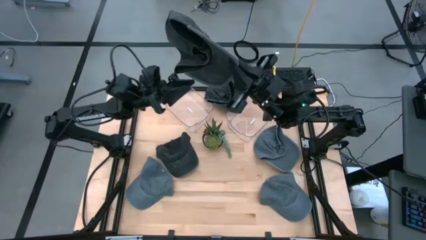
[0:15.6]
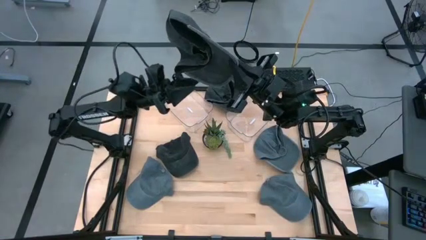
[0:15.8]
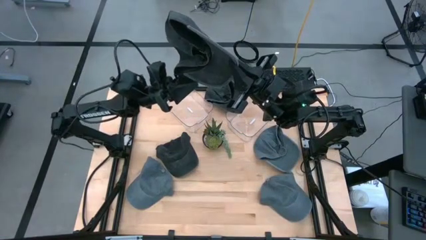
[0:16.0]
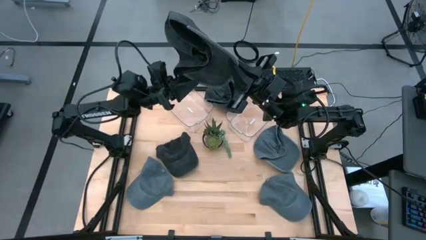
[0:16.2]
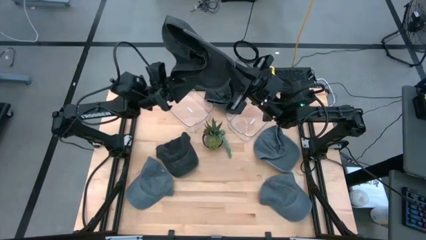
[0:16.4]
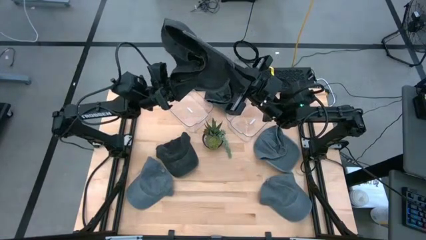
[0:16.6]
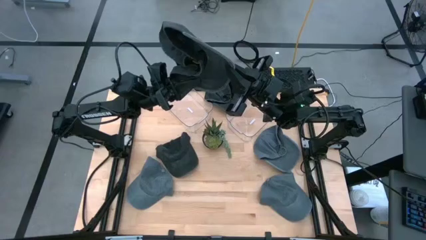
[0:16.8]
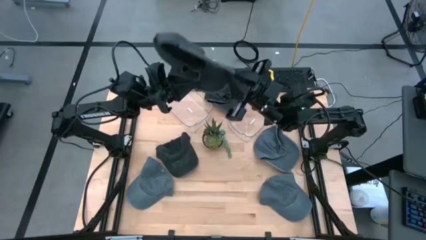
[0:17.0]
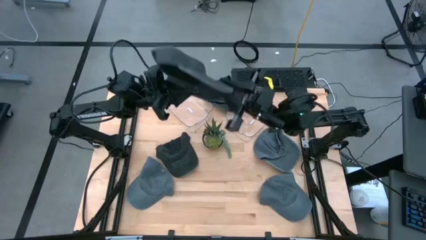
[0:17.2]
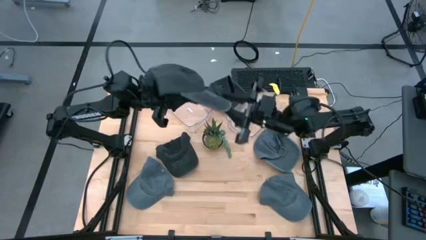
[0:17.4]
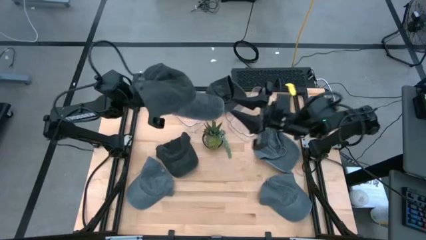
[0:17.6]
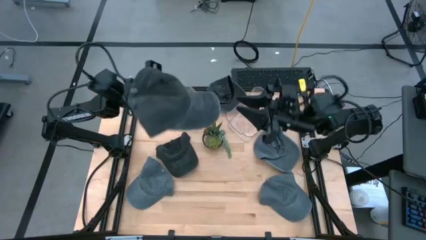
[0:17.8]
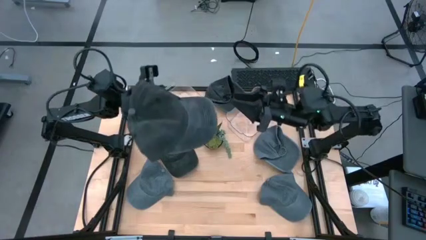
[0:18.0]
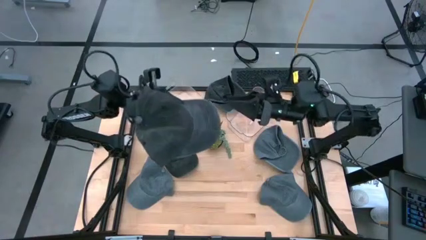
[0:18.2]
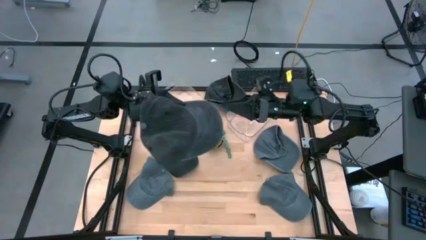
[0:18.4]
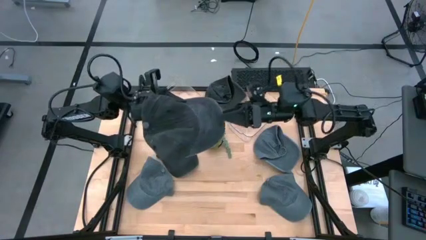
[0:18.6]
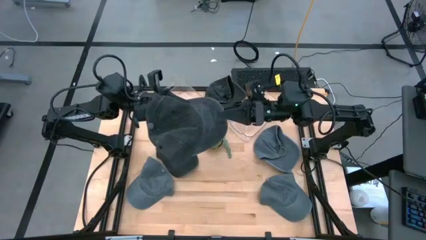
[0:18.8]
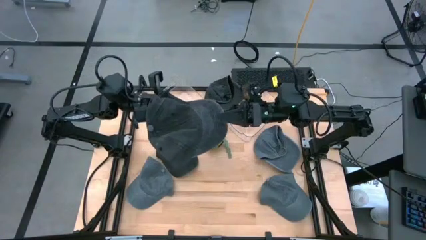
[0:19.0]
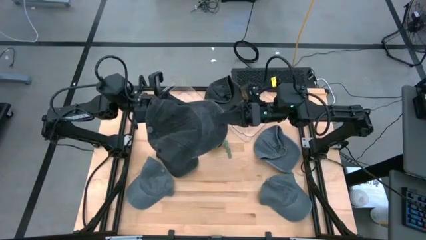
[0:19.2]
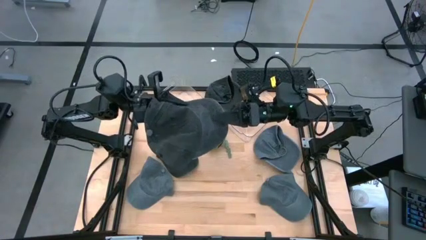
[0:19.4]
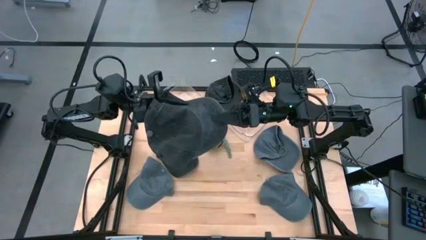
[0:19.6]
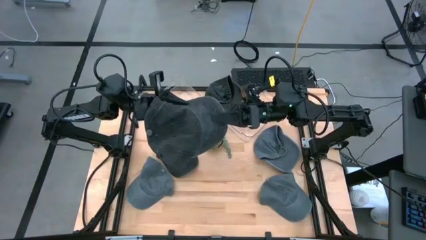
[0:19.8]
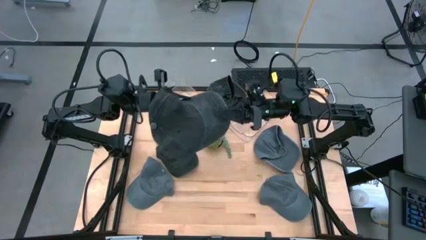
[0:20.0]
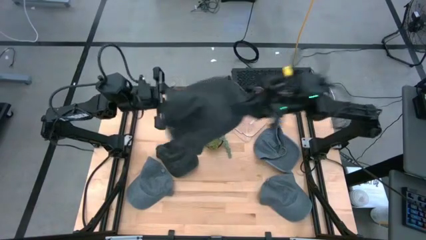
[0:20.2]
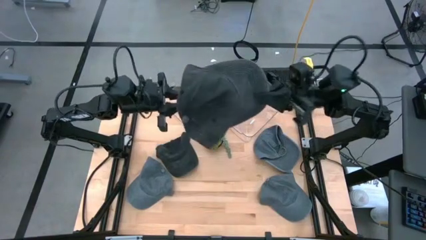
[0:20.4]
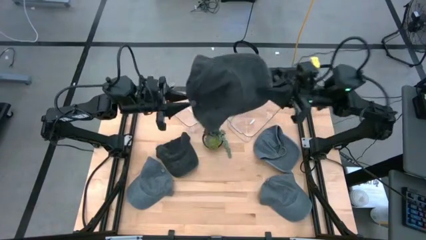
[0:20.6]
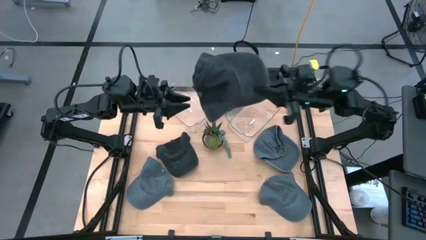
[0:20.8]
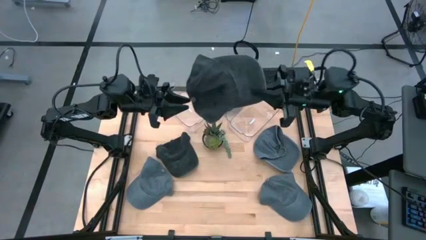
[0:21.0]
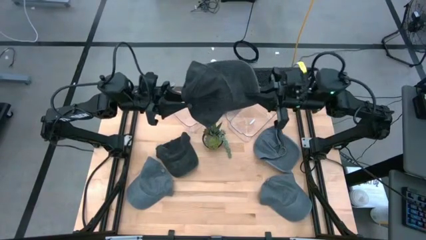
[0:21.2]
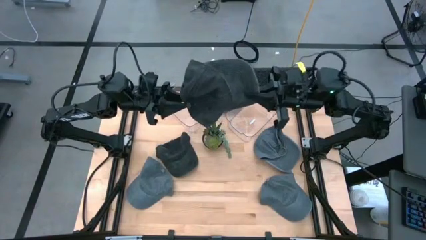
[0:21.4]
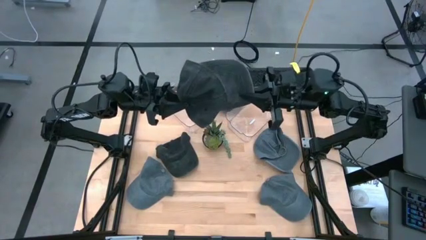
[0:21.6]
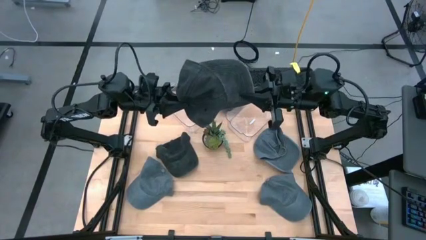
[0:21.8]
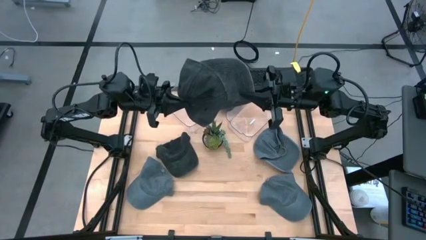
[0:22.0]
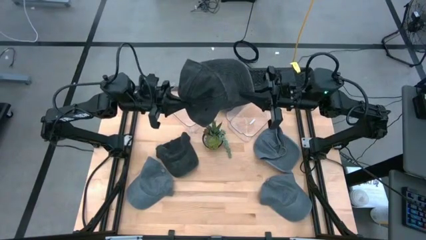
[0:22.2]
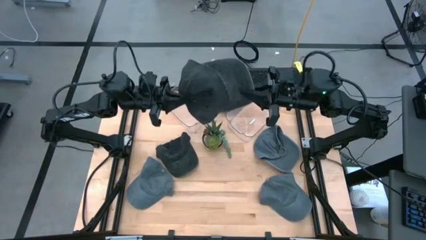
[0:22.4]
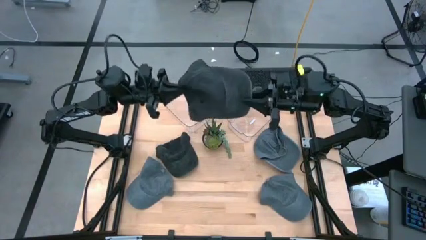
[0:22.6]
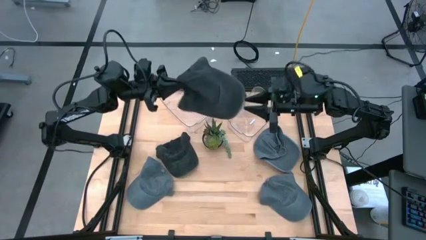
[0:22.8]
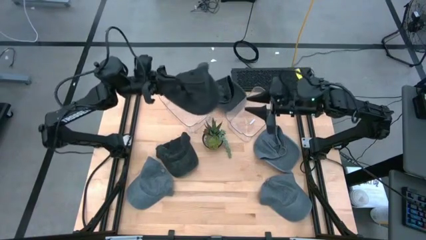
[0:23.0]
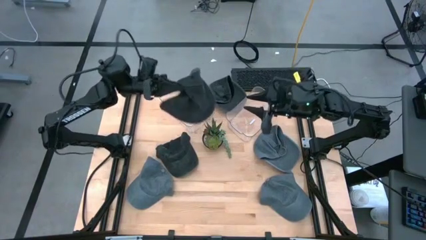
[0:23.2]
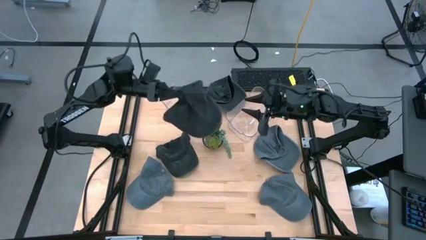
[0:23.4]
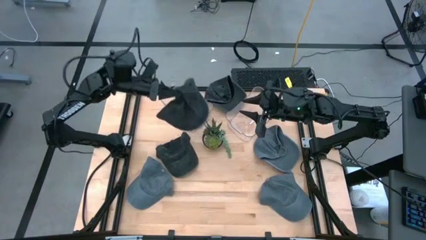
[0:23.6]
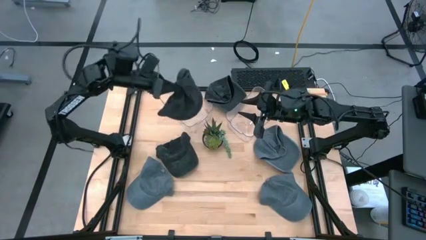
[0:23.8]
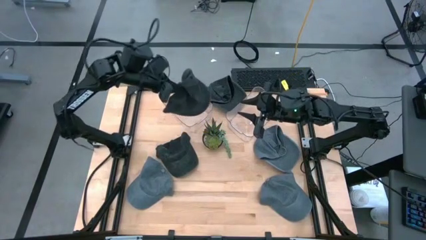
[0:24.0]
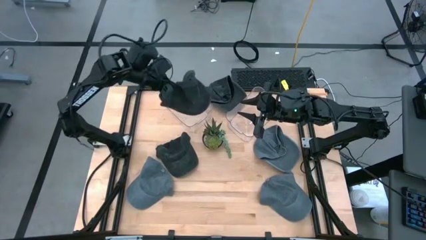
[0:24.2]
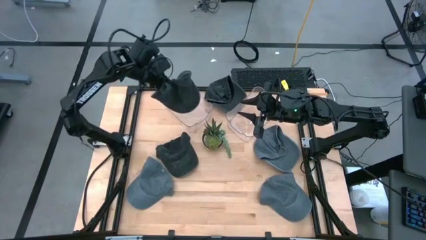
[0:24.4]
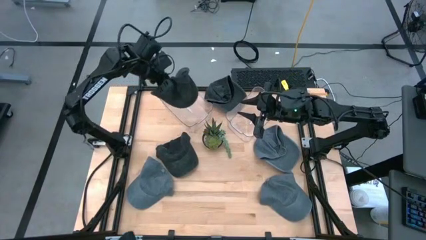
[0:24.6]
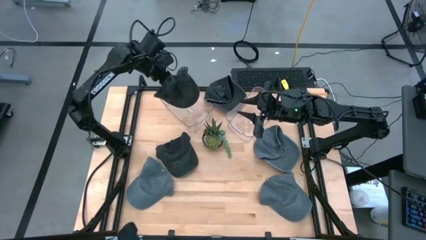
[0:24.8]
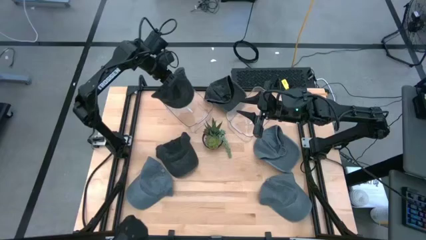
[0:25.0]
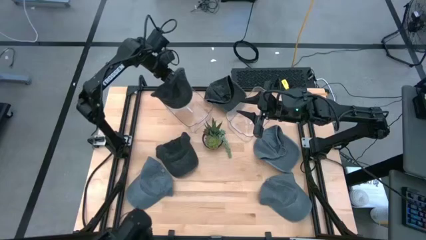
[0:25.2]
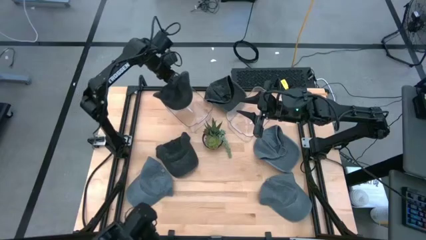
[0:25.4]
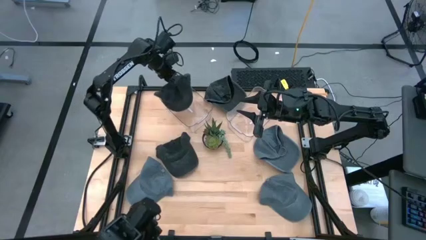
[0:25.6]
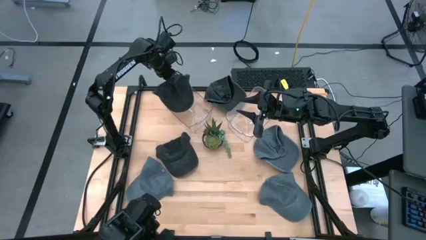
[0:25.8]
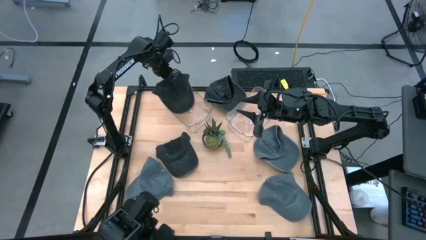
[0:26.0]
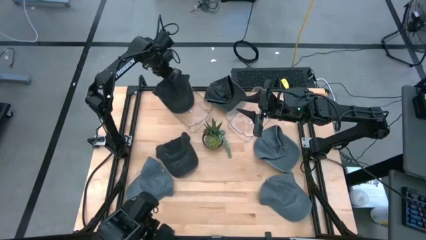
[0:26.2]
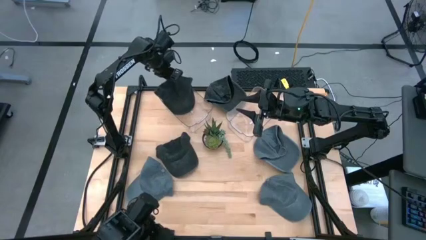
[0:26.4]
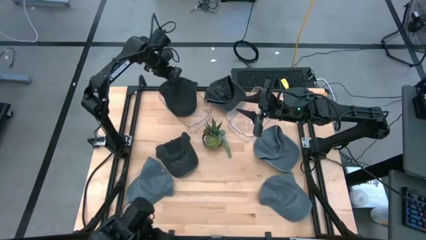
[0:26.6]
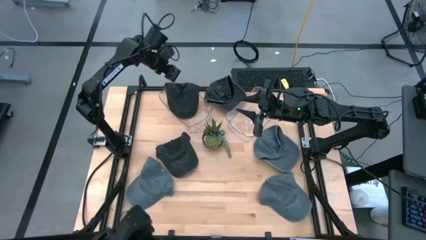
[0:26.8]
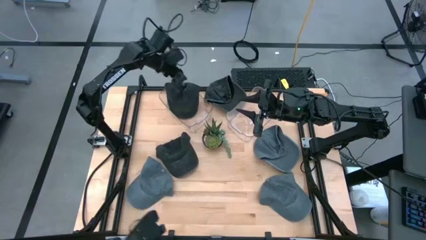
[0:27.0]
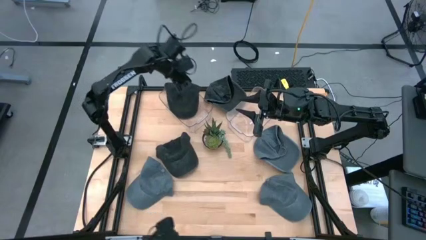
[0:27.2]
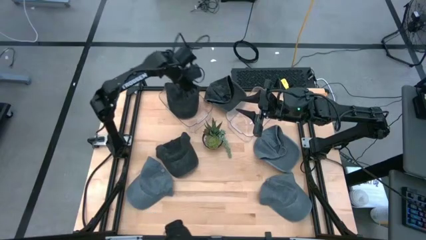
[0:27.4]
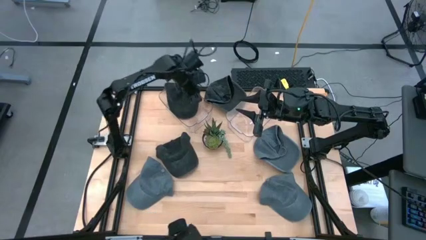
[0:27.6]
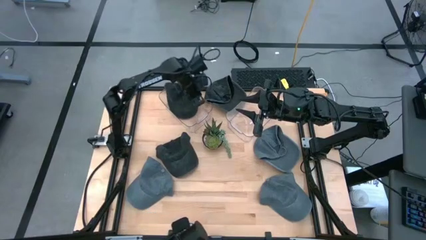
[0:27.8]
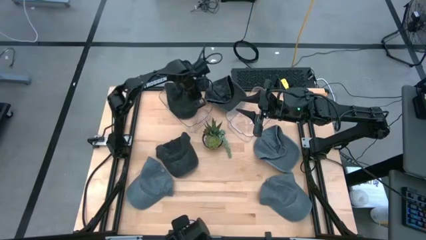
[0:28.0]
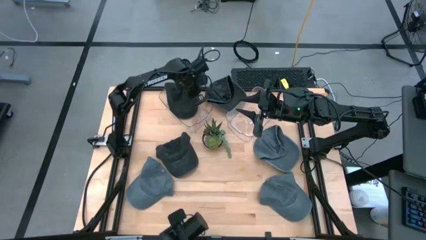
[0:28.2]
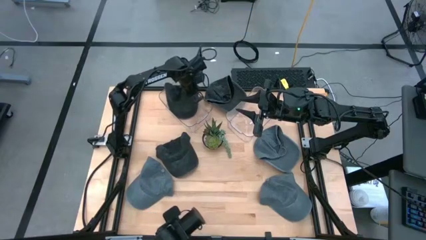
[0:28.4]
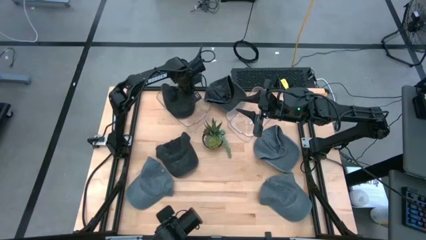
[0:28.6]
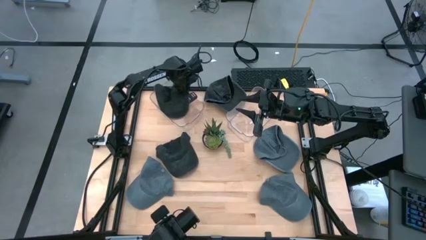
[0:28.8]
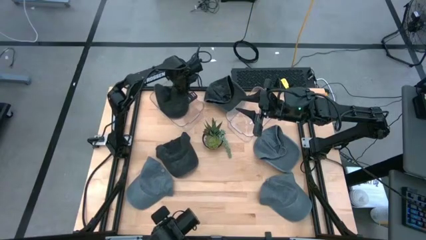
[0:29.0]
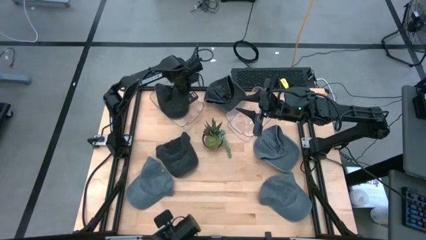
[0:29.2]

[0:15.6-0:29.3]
Task: Pick & Place hat
Put the bottom right black cap into the left transparent bin
